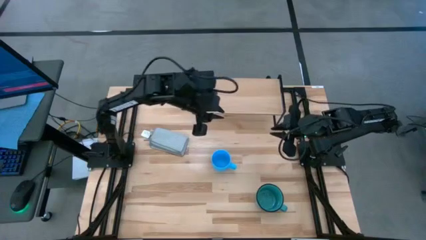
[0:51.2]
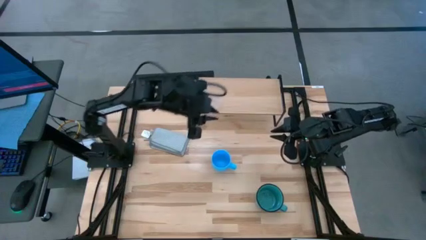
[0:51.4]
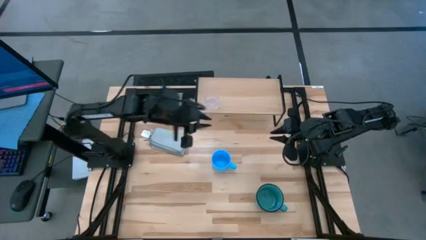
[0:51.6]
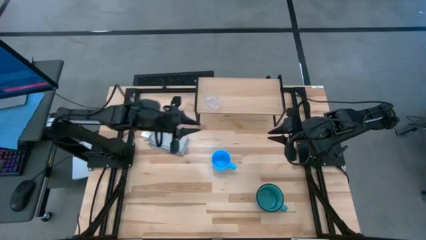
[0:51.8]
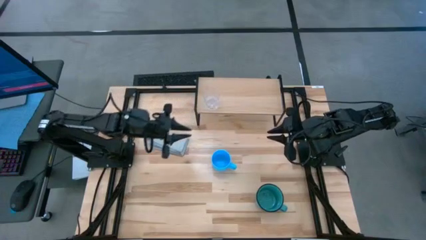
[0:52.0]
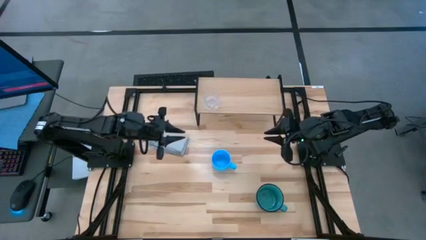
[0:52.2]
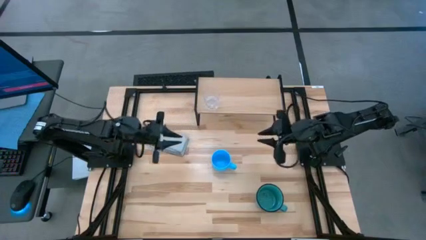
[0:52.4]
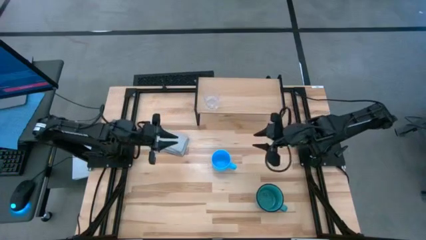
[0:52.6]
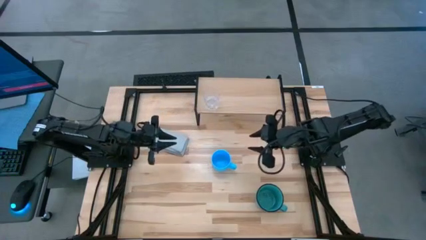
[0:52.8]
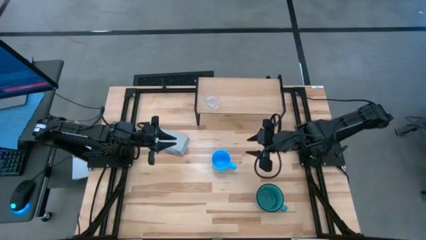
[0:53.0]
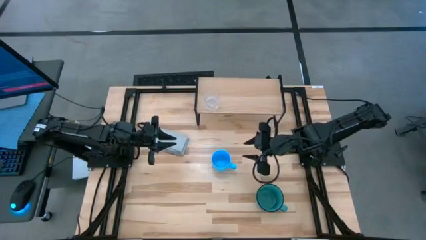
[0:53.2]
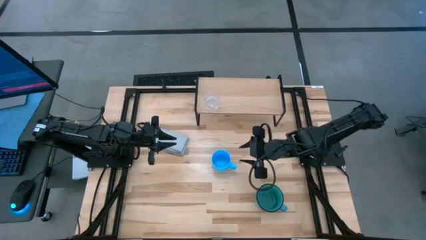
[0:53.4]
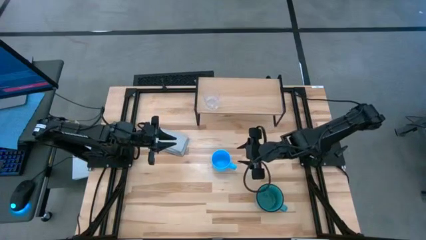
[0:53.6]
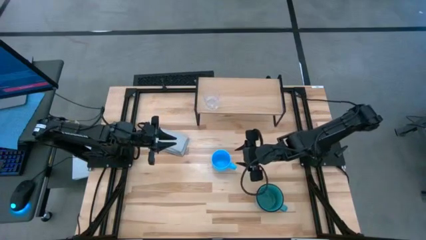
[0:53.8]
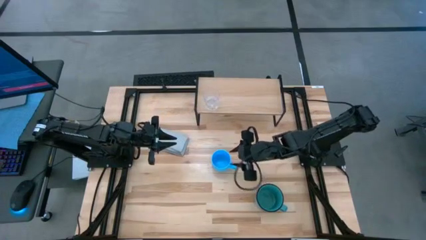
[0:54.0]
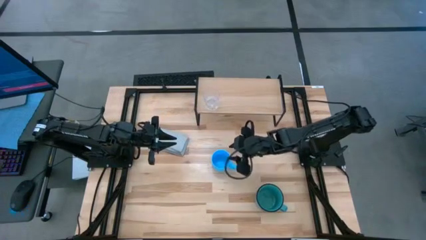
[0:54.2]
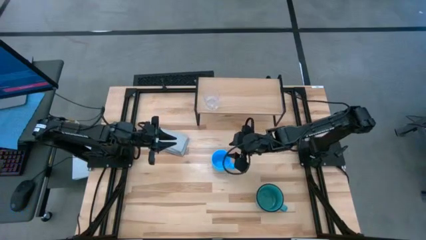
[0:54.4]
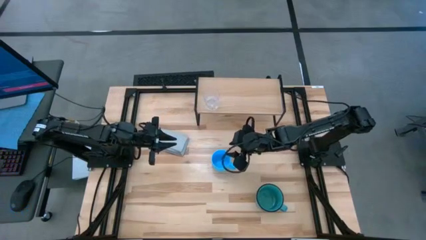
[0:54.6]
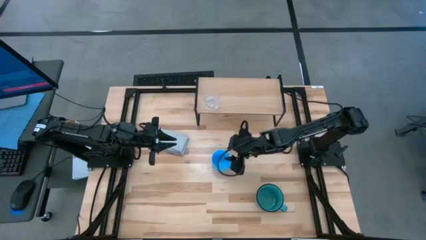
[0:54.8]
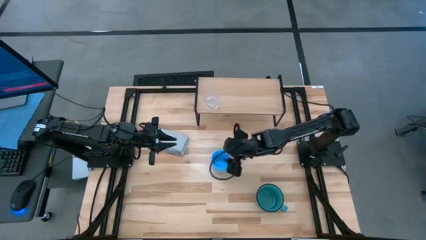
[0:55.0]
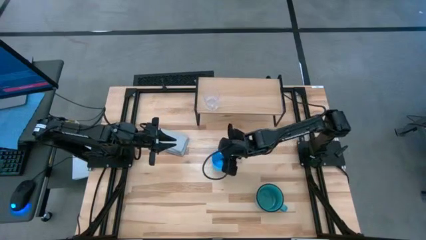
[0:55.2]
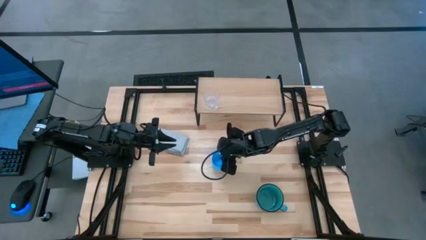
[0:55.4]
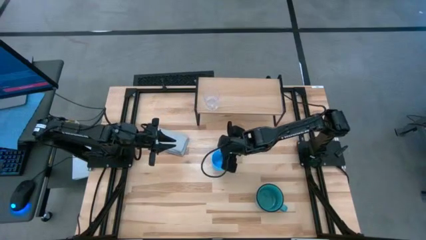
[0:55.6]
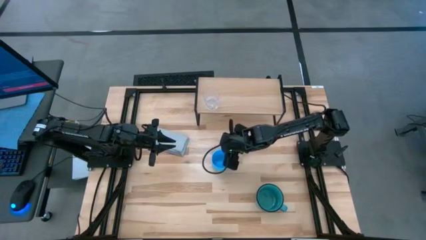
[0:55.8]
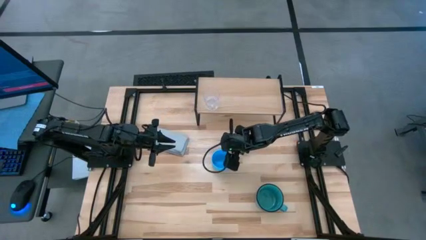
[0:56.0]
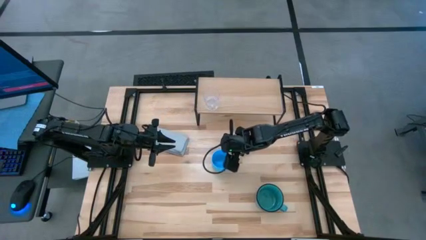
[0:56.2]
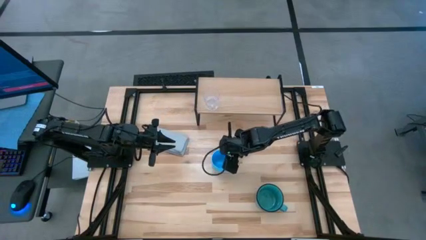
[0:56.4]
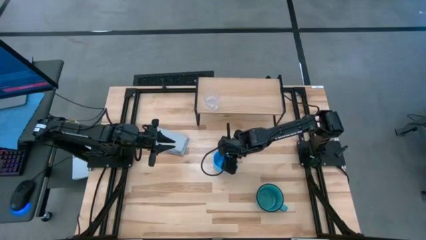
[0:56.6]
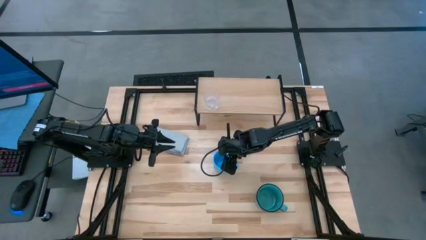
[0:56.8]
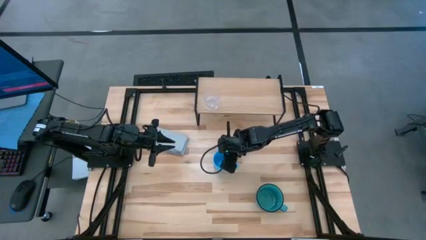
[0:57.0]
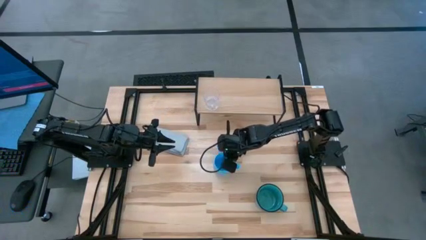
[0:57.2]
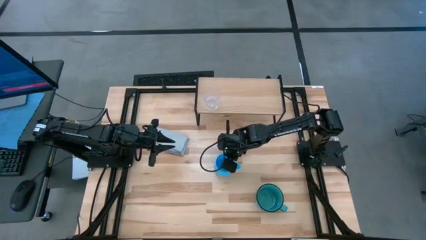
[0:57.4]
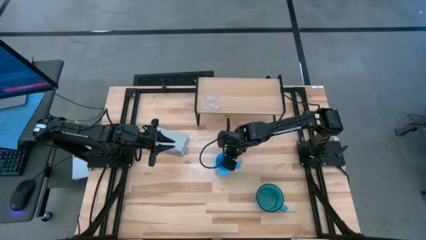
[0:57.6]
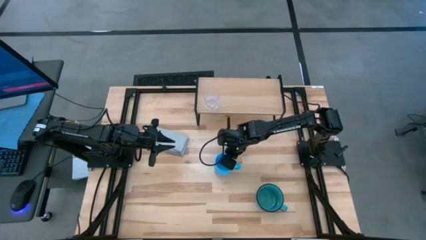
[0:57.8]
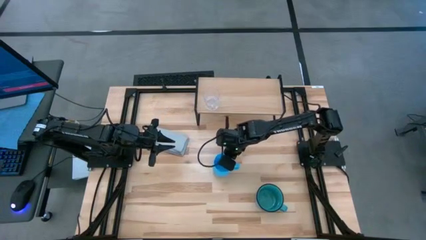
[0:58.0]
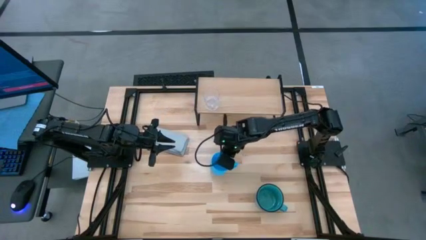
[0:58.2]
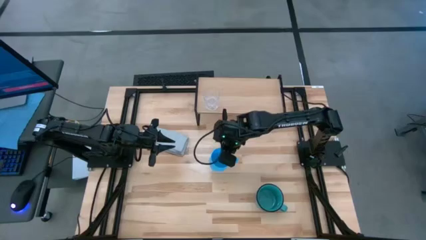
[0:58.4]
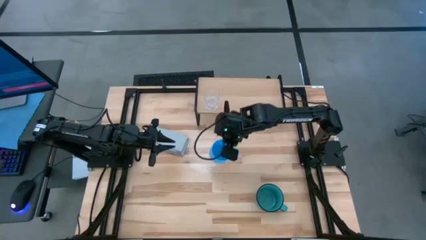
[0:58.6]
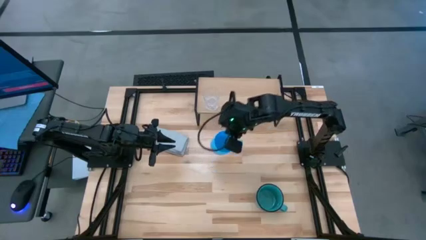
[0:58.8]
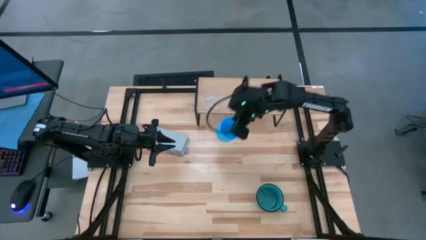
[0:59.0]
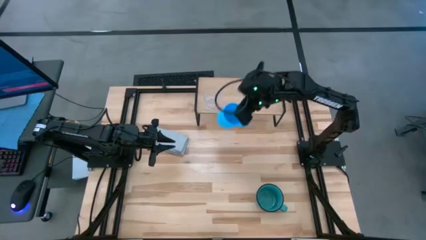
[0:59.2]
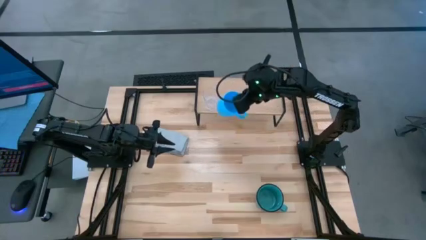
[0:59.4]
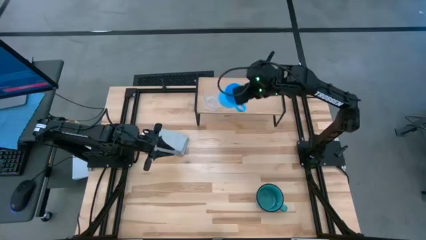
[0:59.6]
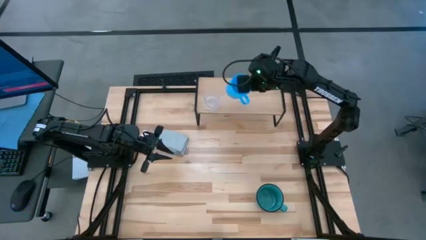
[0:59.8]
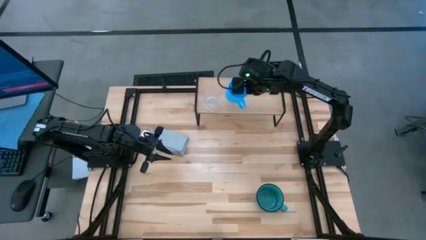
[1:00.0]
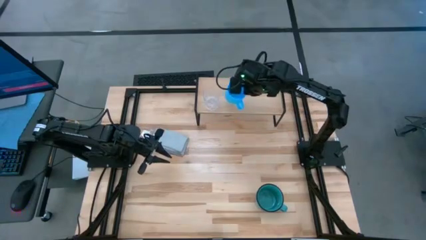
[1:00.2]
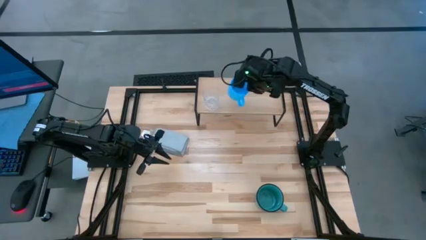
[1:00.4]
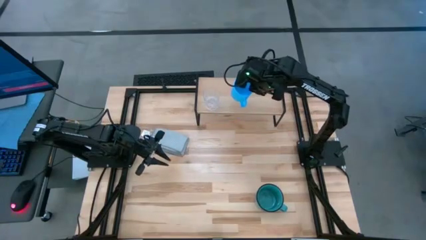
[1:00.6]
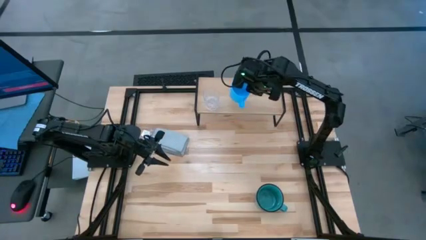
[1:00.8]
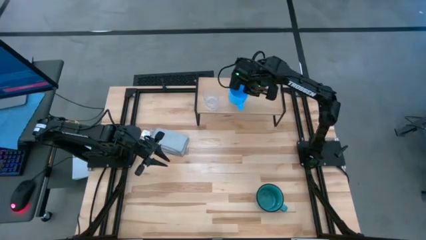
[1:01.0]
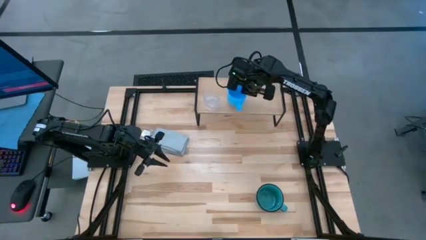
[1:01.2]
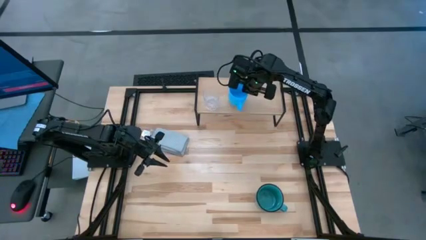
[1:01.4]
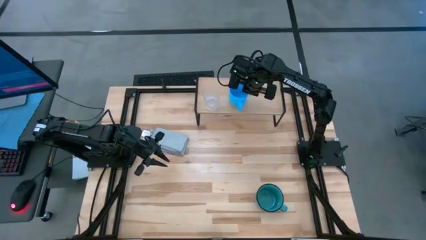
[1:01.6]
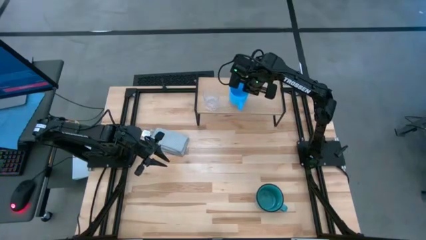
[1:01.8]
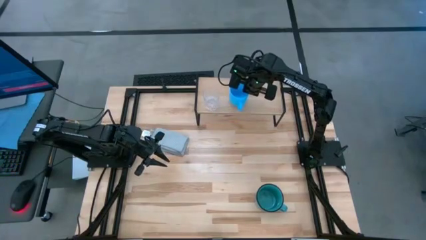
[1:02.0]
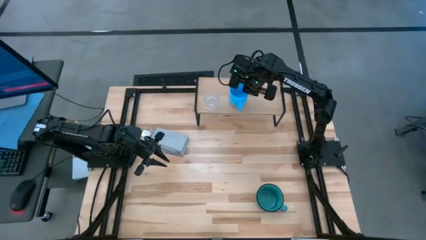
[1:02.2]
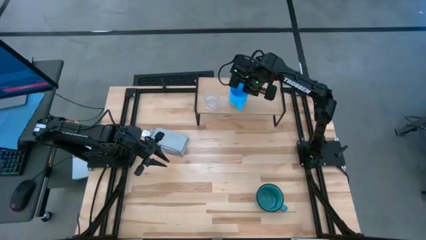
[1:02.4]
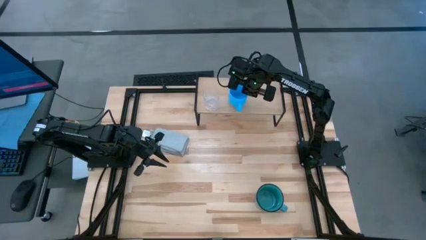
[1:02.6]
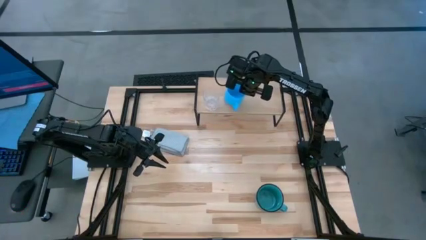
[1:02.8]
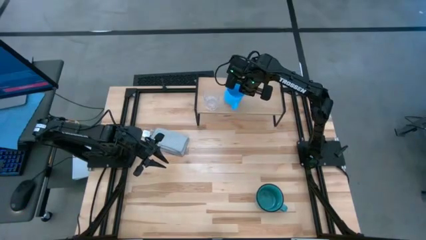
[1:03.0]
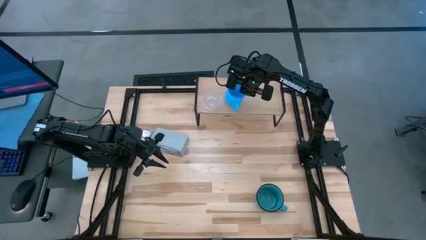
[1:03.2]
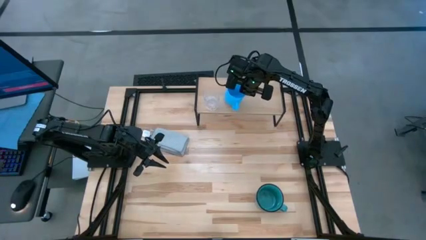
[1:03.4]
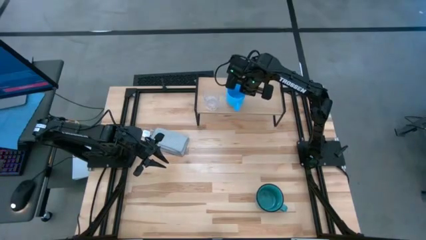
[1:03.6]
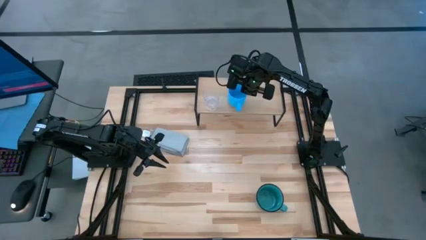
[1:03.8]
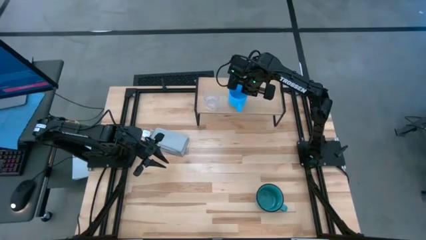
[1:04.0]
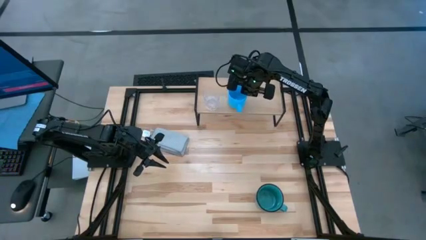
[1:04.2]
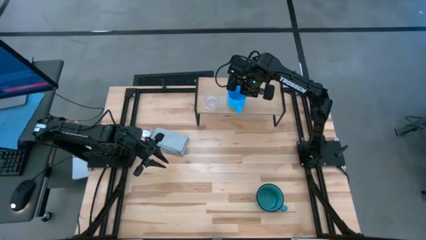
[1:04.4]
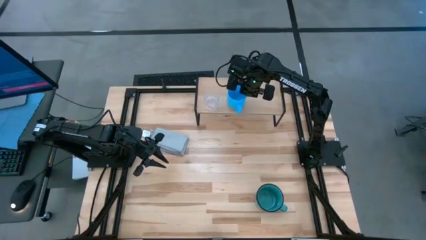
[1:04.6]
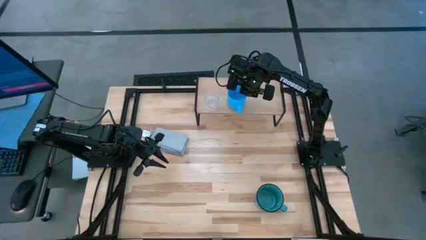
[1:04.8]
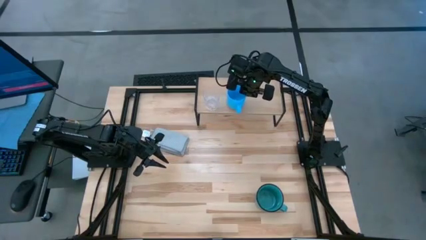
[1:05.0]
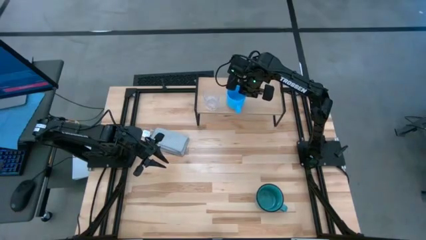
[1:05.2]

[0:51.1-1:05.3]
Task: Stack small to large cups/mugs on shelf
Put the blue mug on the shelf

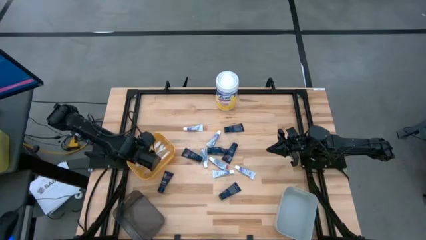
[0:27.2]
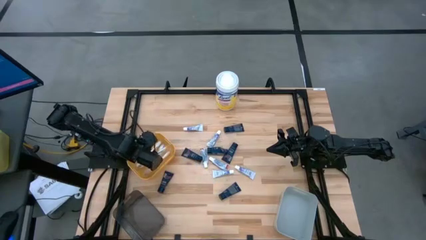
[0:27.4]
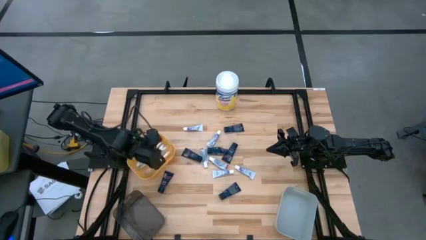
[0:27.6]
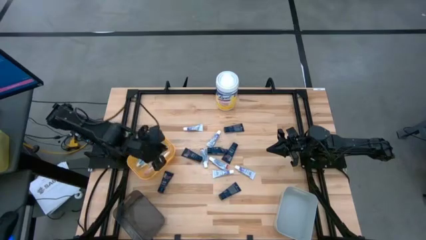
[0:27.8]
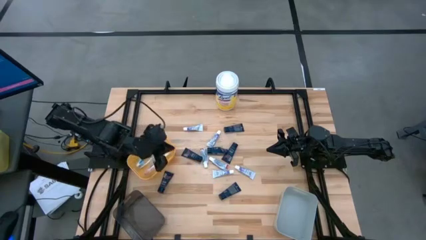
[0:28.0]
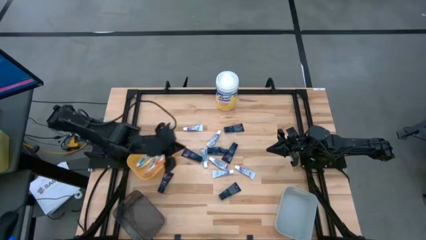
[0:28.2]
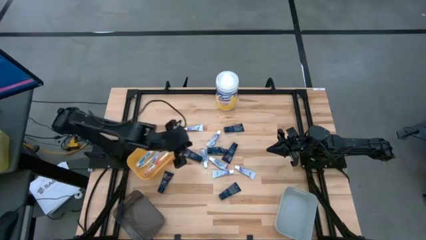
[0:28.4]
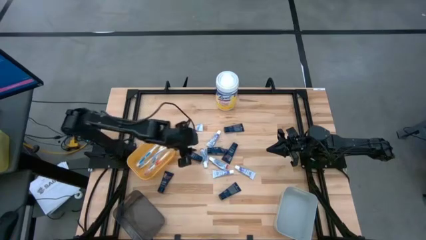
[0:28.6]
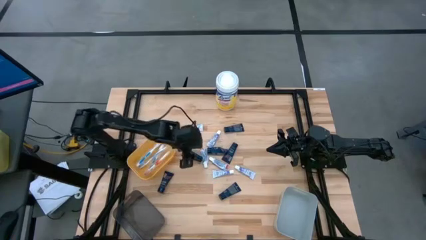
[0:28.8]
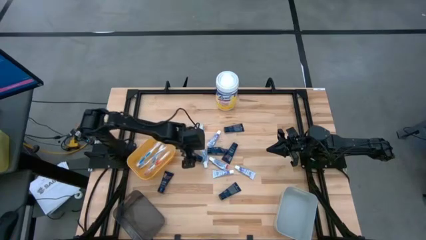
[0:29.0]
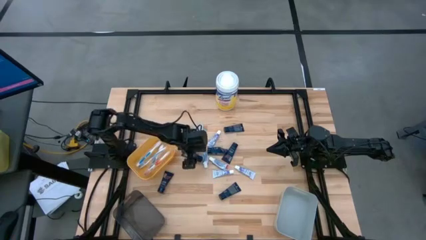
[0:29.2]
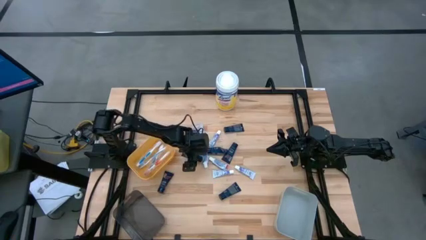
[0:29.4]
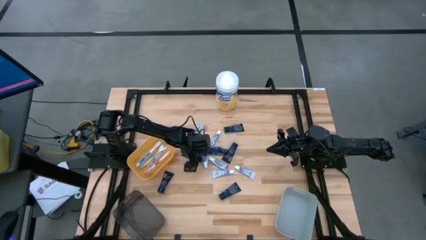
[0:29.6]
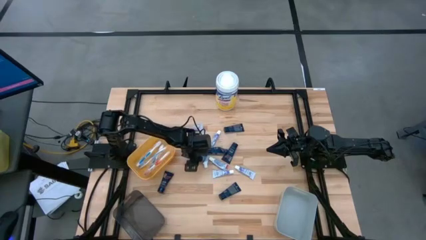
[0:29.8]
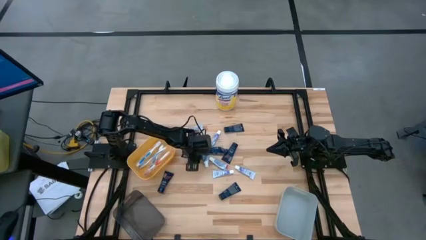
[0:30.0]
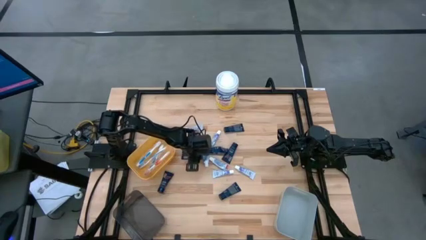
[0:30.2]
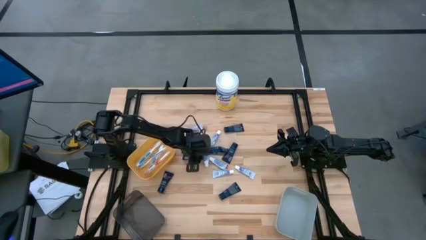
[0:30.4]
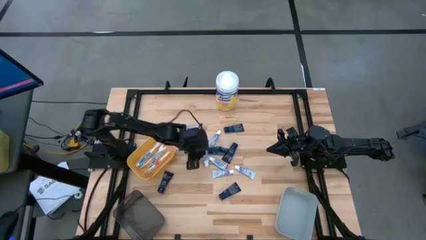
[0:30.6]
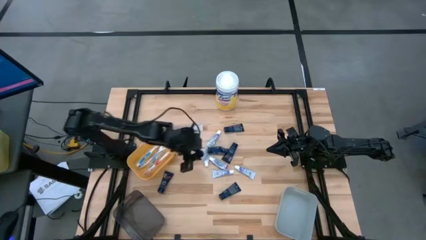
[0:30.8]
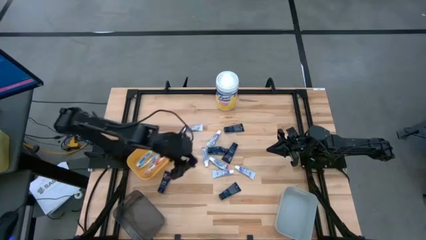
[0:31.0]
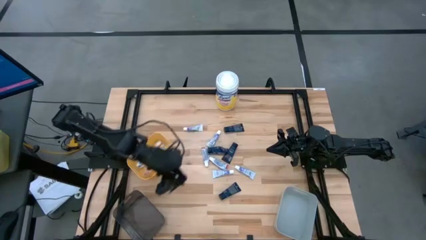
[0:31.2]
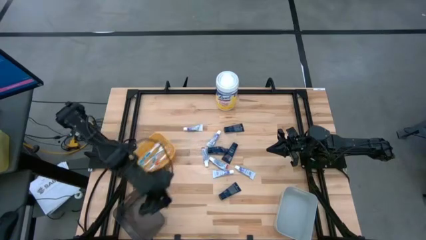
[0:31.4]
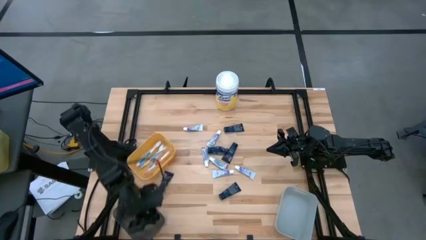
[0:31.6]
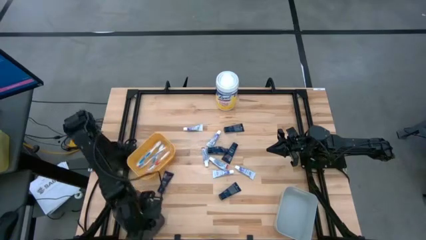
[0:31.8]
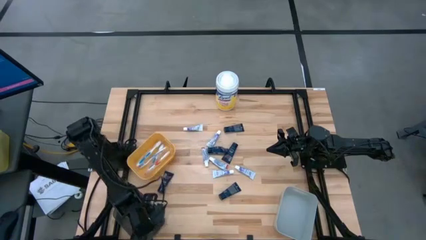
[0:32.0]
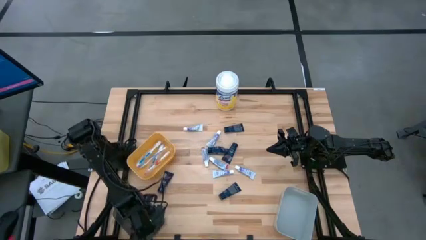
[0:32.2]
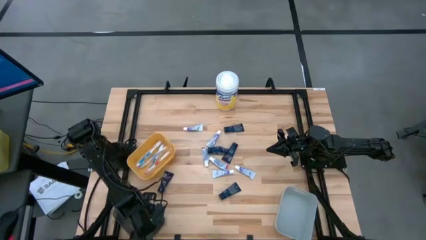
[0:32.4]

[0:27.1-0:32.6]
Task: Pick & Place Travel size toiletries
Put the blue shave cream into the black transparent bin
